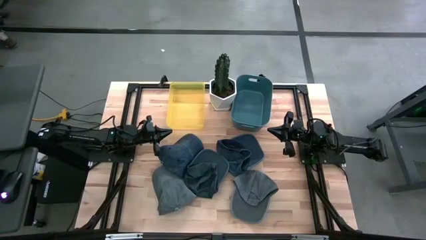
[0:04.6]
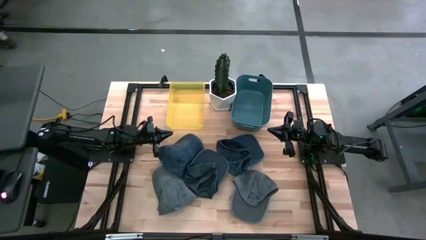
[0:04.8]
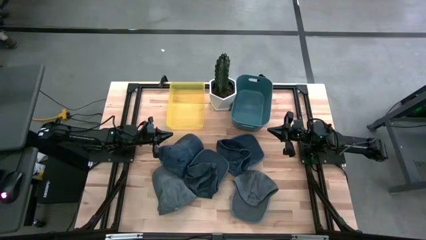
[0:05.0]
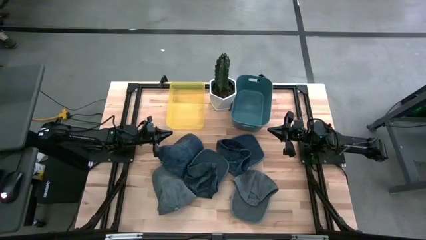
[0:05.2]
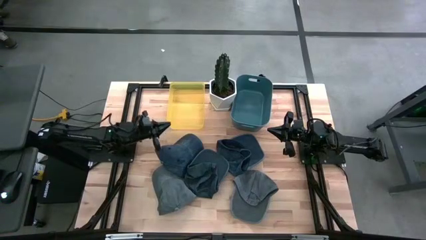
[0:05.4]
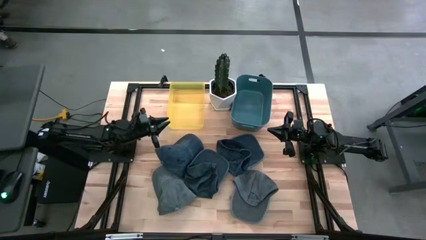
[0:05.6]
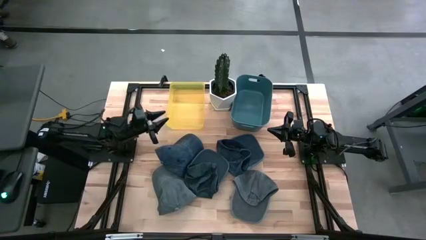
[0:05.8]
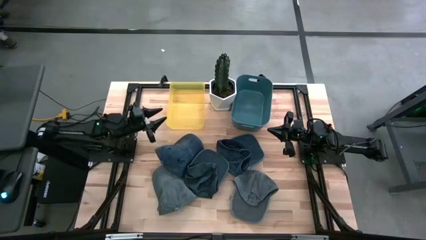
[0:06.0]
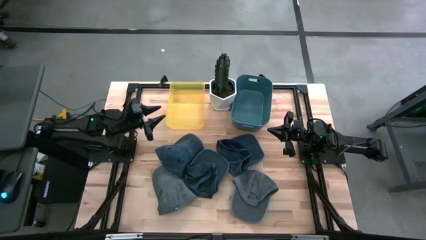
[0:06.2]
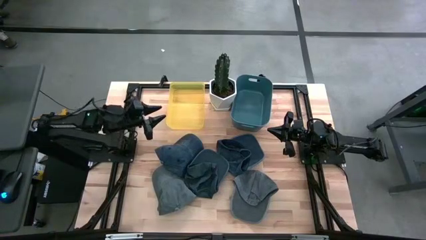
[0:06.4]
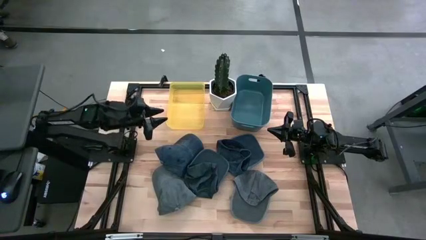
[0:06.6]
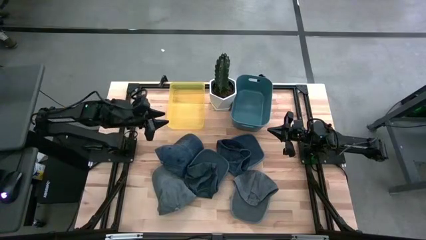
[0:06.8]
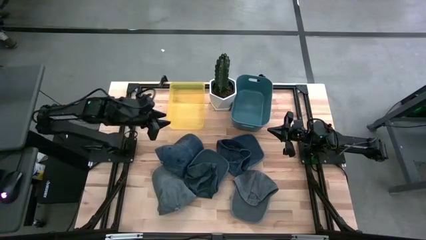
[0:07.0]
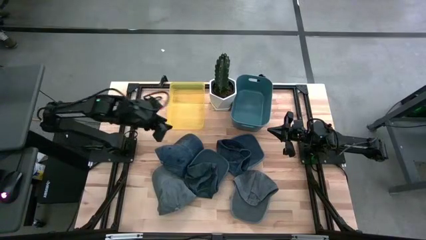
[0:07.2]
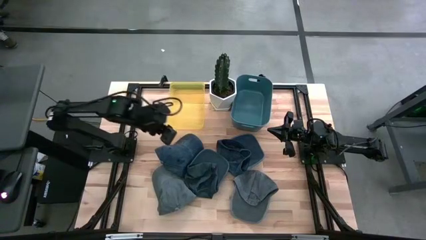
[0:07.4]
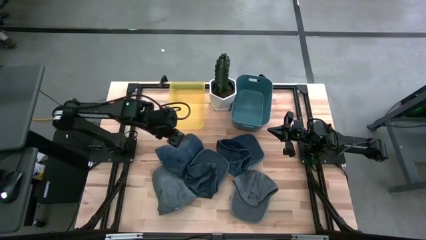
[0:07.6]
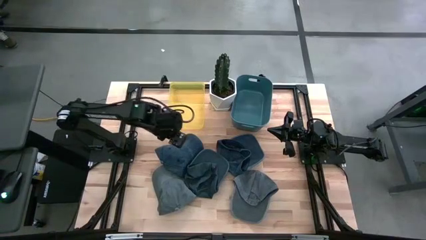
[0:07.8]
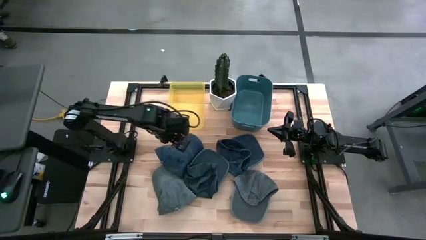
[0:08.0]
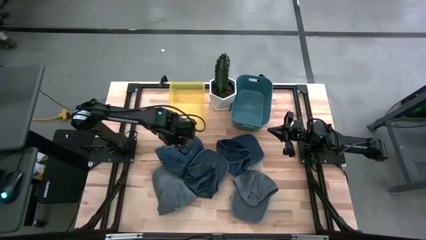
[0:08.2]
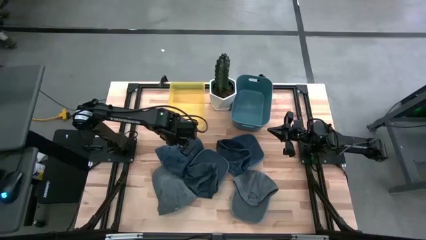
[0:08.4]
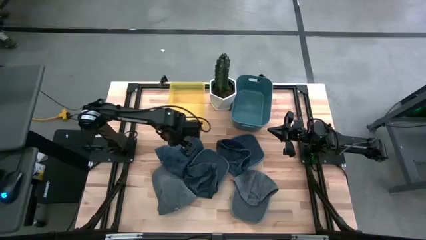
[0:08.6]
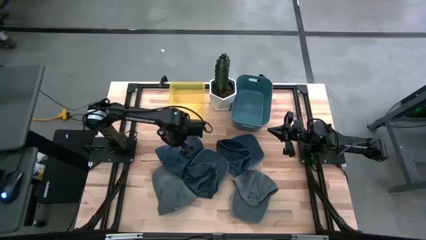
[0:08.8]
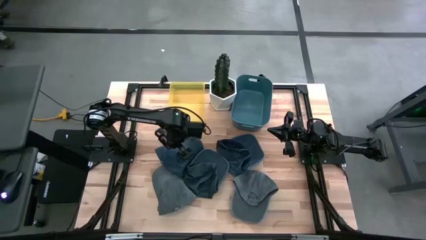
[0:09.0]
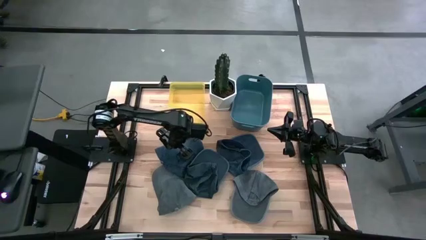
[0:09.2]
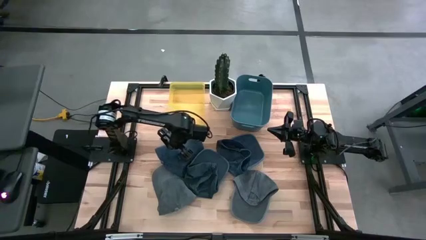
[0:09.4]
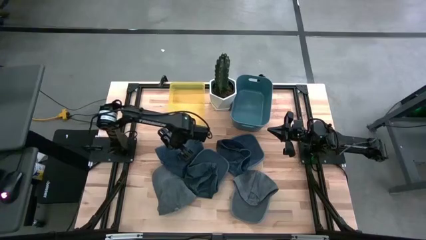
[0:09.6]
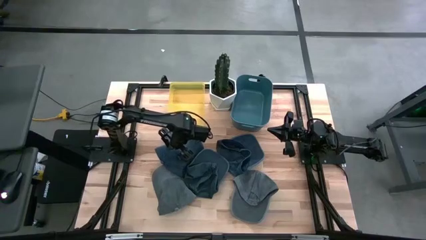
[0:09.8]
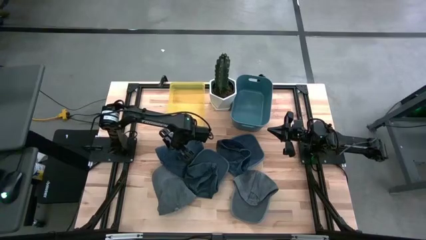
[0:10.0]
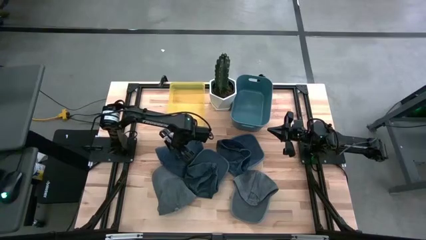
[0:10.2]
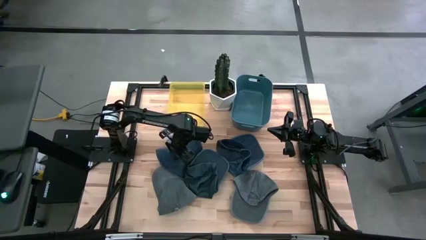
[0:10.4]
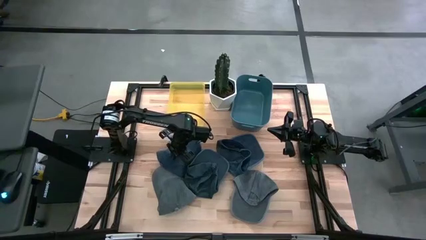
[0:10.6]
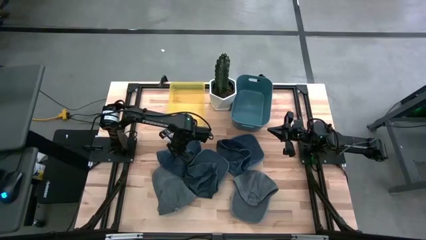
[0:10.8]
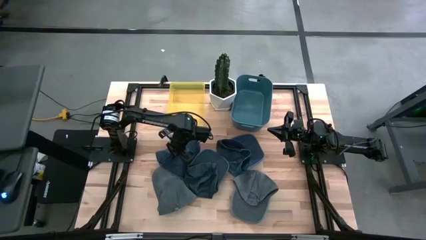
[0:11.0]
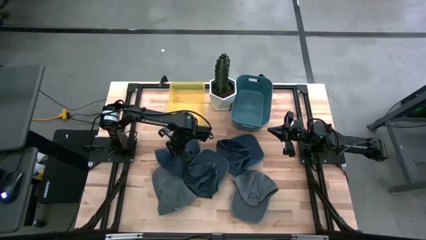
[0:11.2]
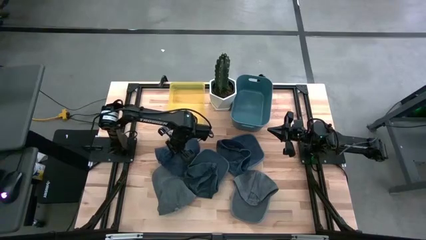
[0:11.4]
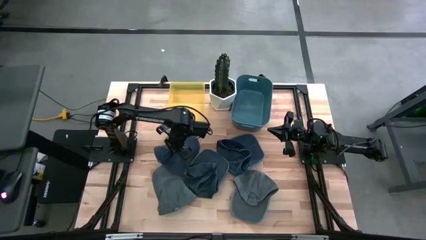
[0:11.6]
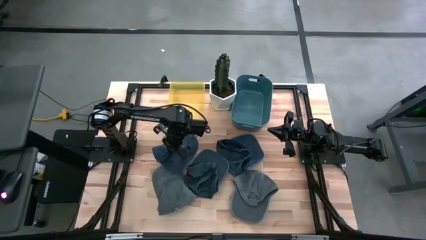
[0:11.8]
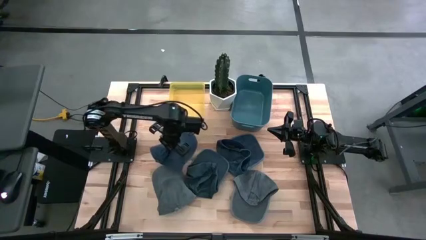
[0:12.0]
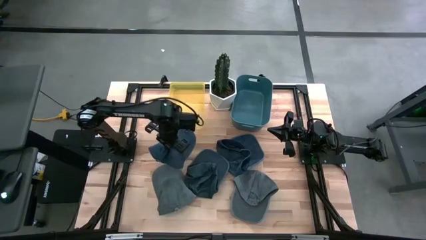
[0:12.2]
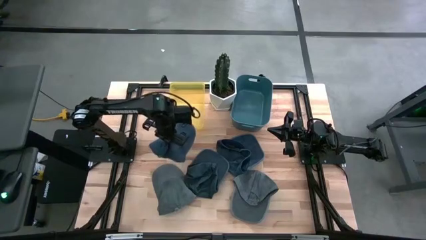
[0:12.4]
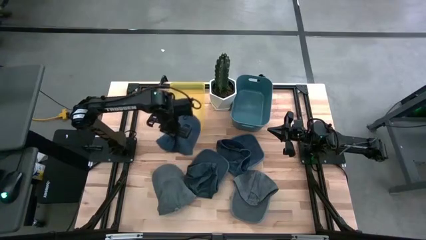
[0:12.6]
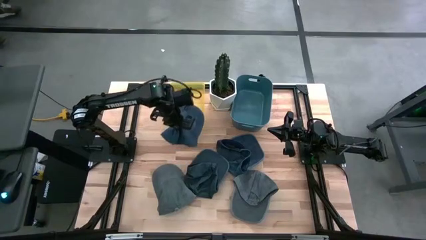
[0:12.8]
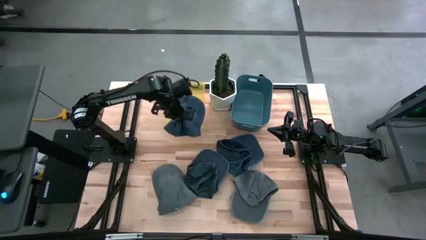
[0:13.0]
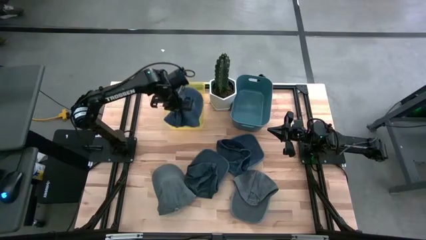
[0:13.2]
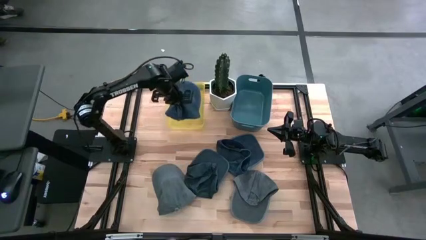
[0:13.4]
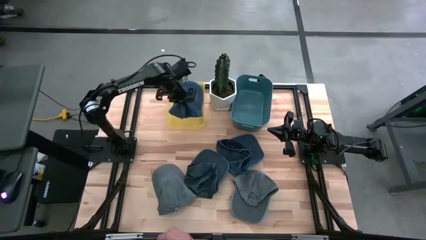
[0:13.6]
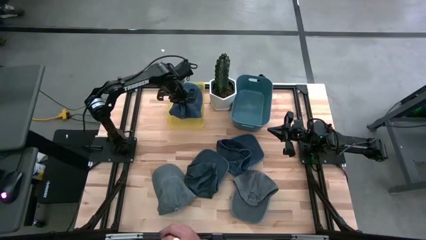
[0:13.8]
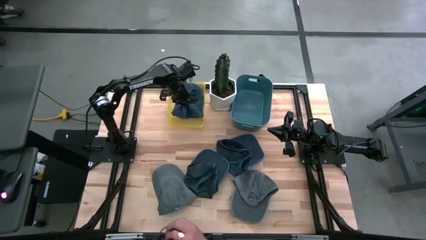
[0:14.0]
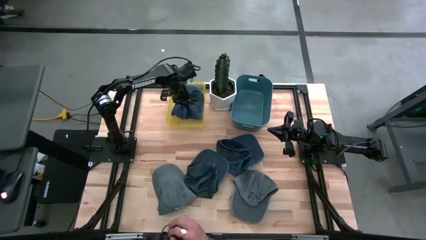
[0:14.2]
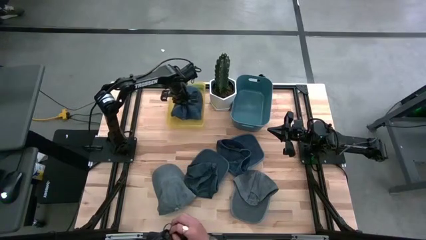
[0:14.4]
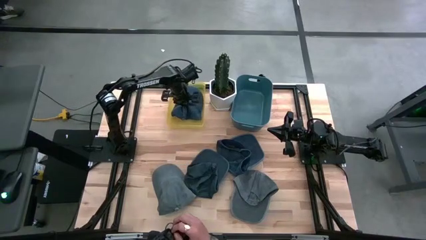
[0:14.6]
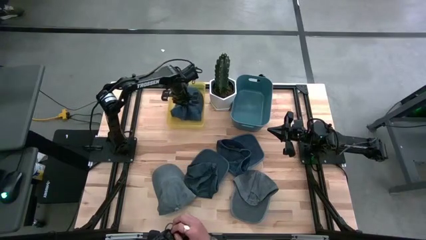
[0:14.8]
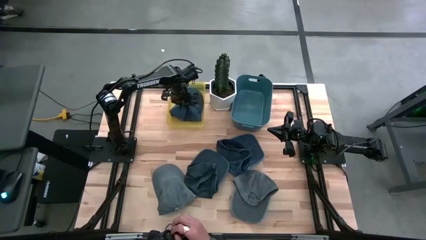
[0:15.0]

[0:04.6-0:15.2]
Task: Pick & Place hat
Put the left blue cap into the yellow bin
